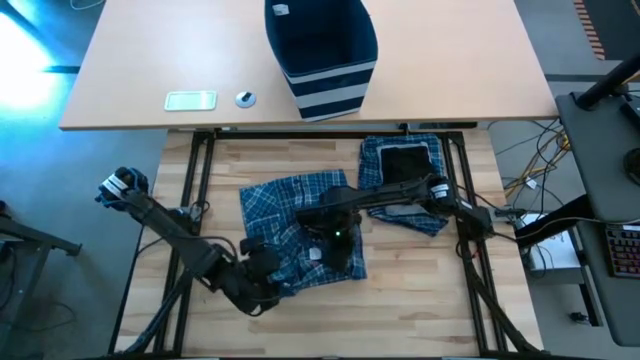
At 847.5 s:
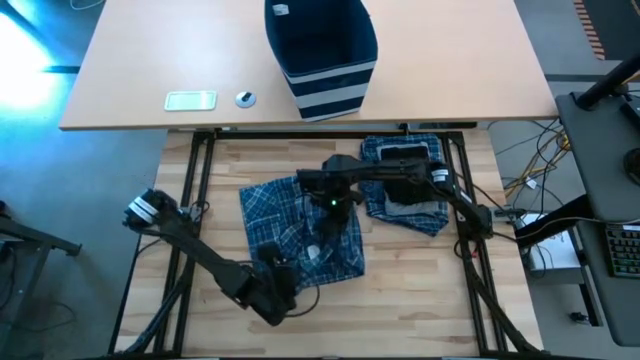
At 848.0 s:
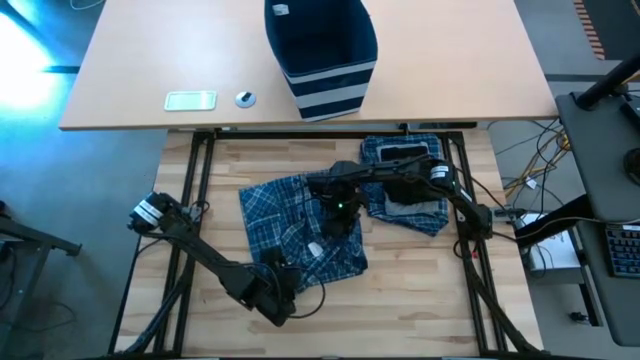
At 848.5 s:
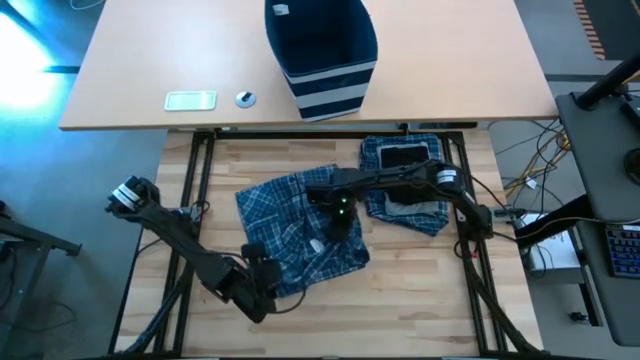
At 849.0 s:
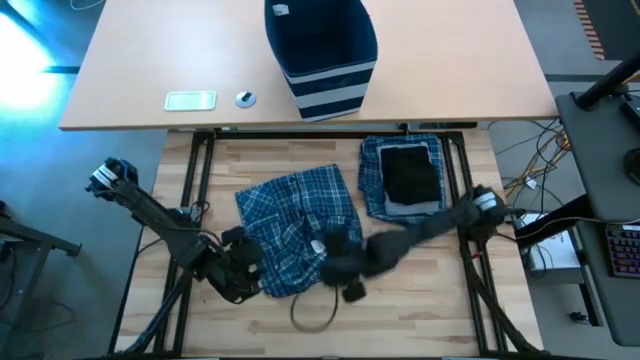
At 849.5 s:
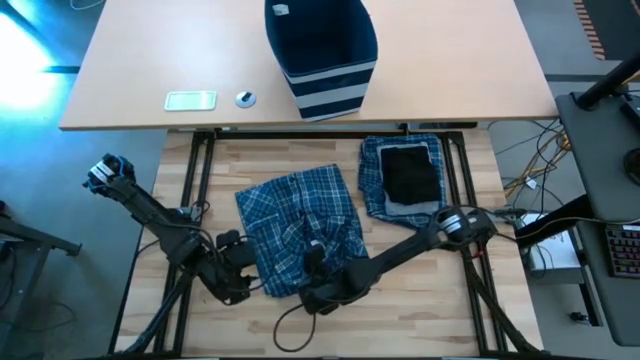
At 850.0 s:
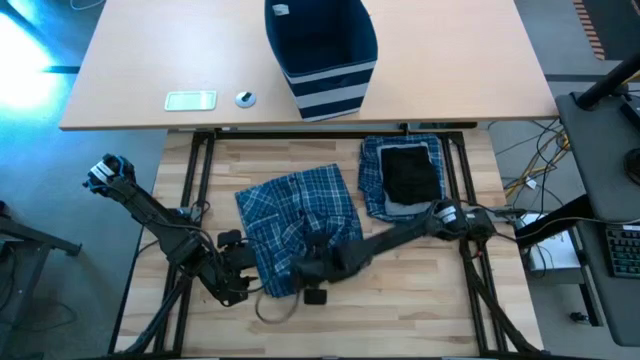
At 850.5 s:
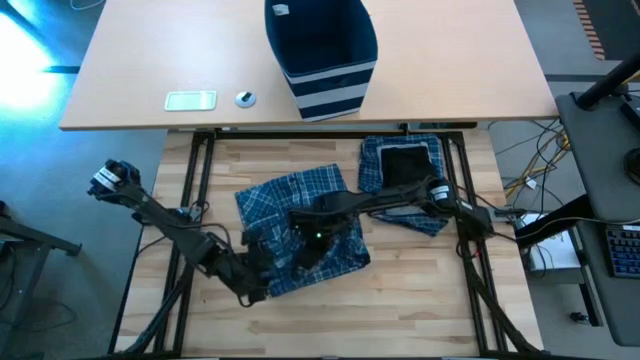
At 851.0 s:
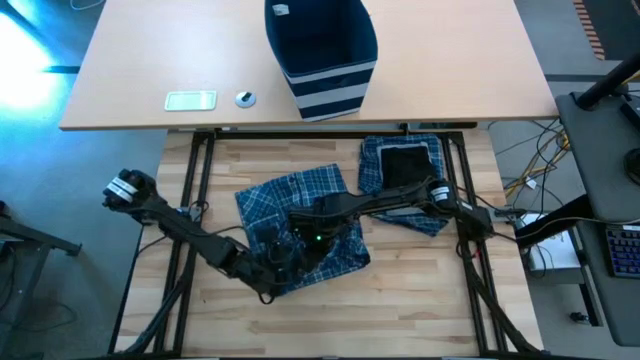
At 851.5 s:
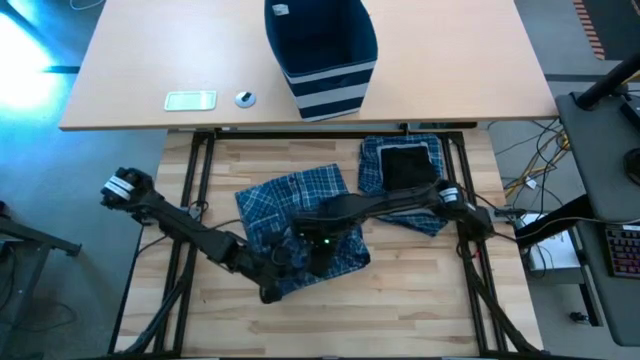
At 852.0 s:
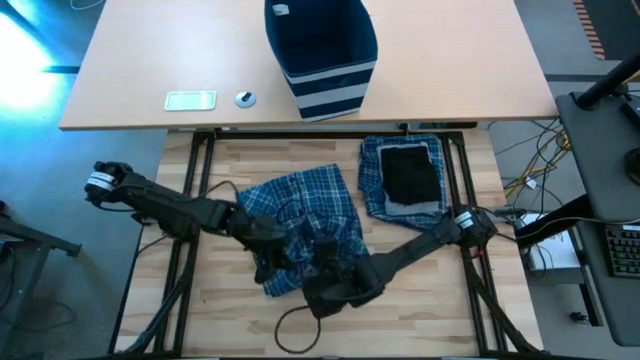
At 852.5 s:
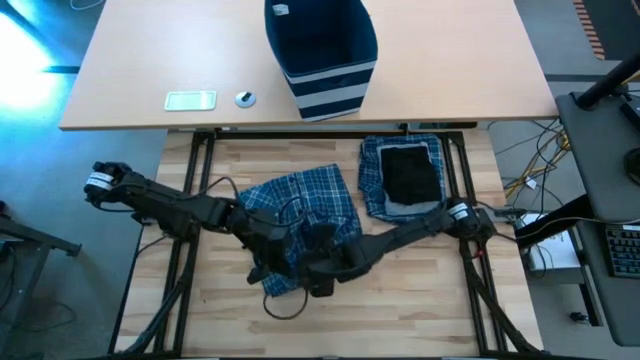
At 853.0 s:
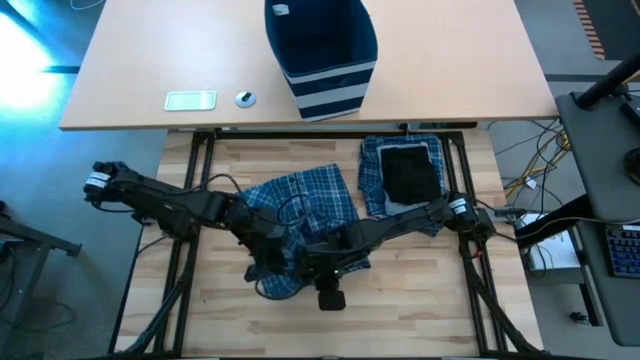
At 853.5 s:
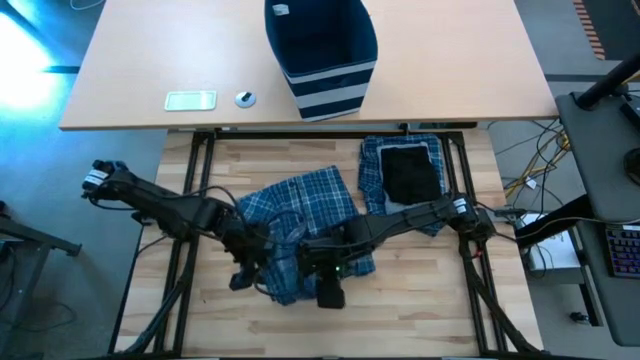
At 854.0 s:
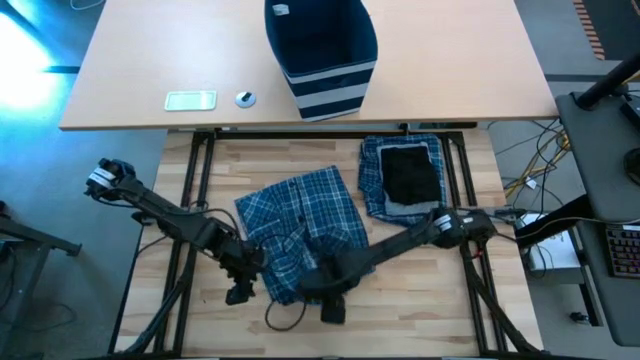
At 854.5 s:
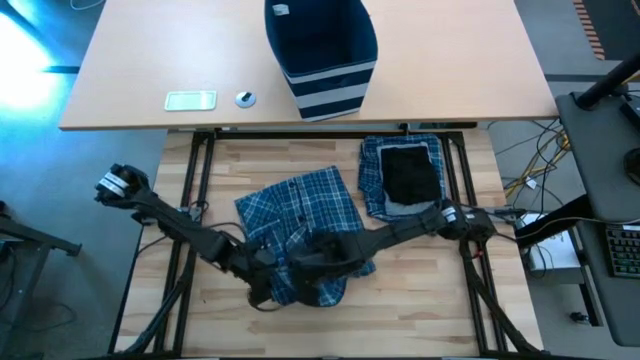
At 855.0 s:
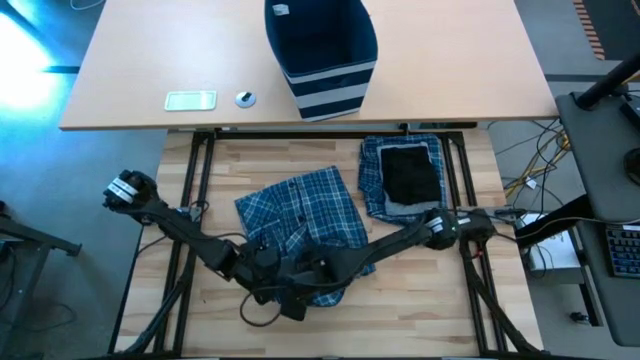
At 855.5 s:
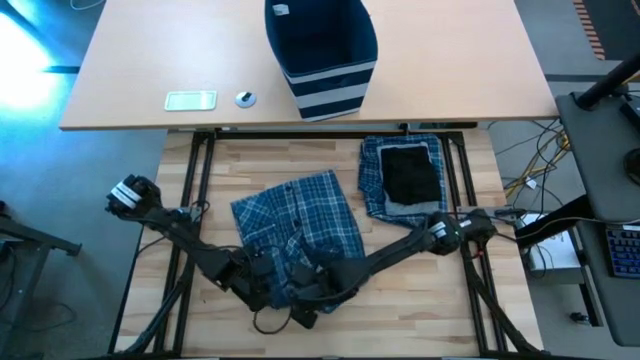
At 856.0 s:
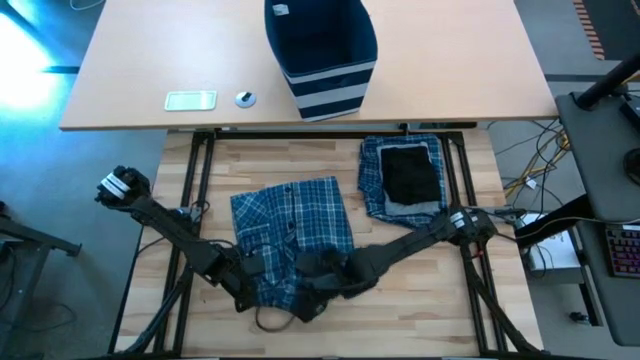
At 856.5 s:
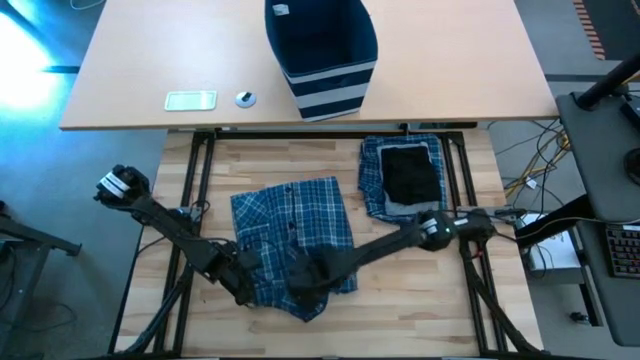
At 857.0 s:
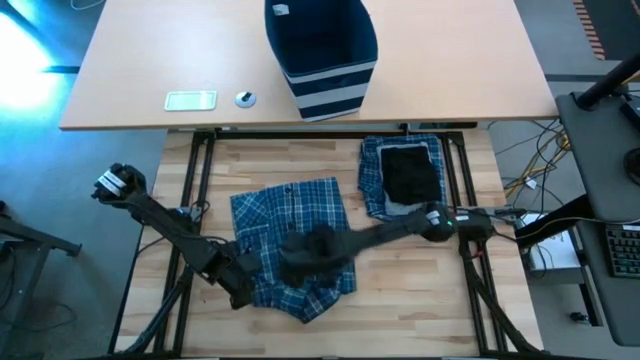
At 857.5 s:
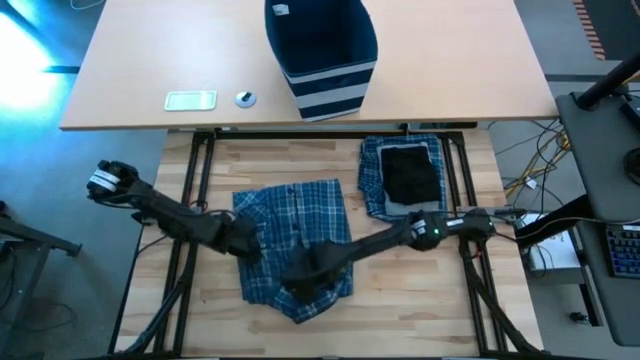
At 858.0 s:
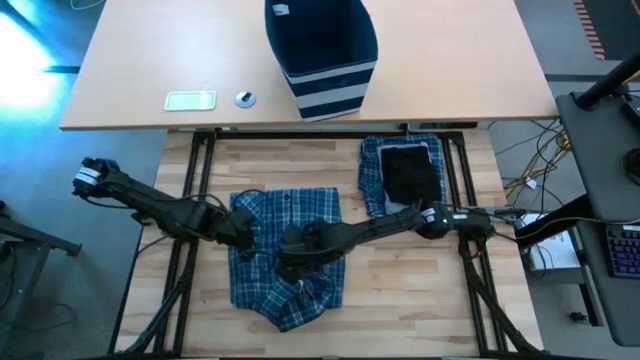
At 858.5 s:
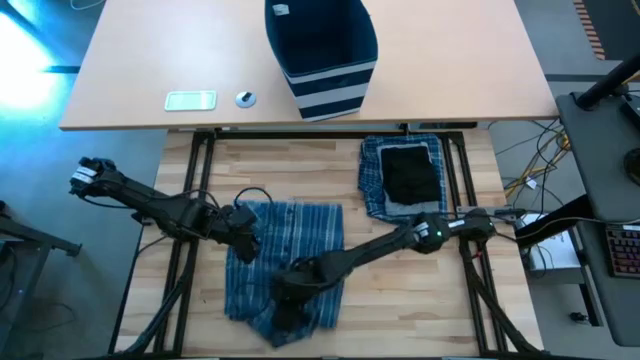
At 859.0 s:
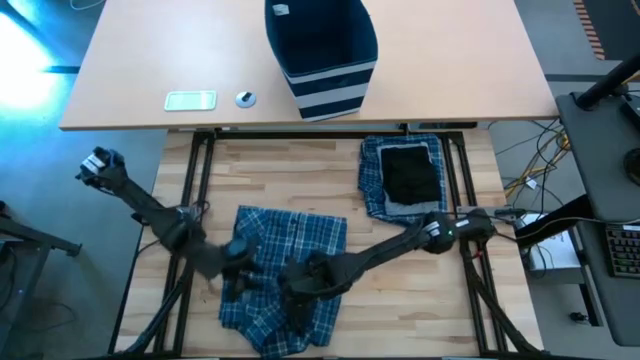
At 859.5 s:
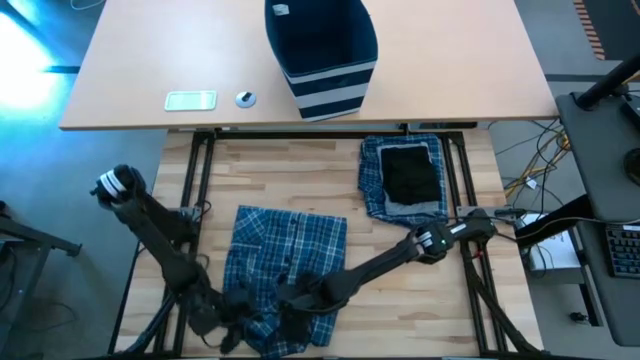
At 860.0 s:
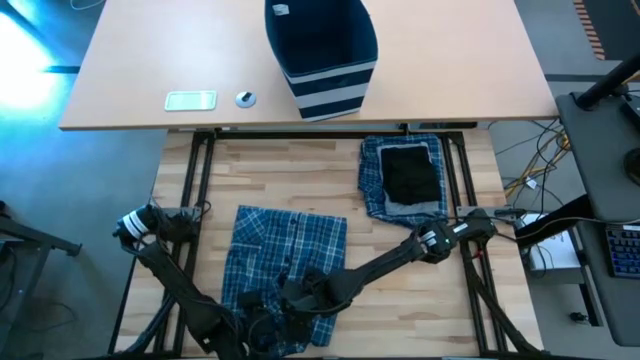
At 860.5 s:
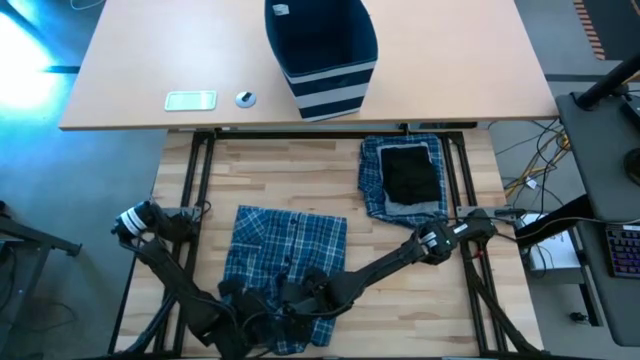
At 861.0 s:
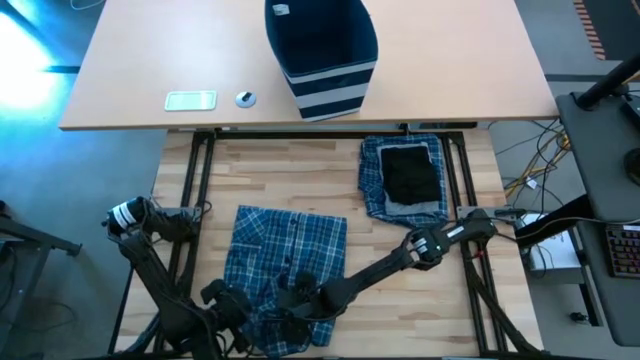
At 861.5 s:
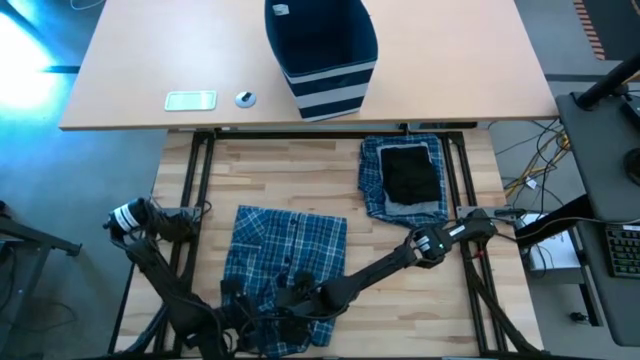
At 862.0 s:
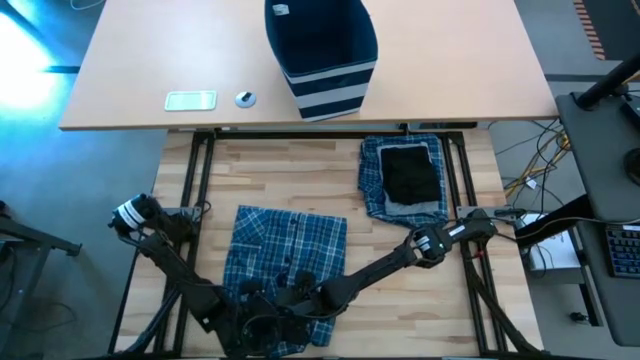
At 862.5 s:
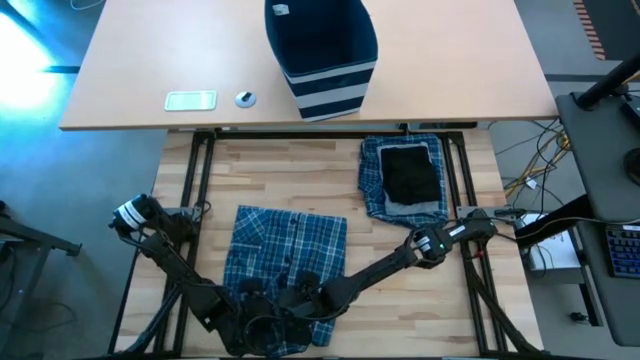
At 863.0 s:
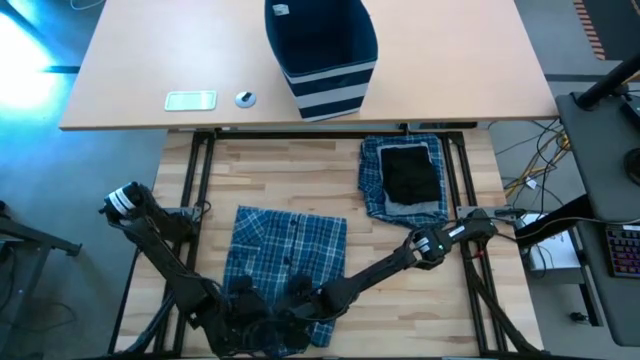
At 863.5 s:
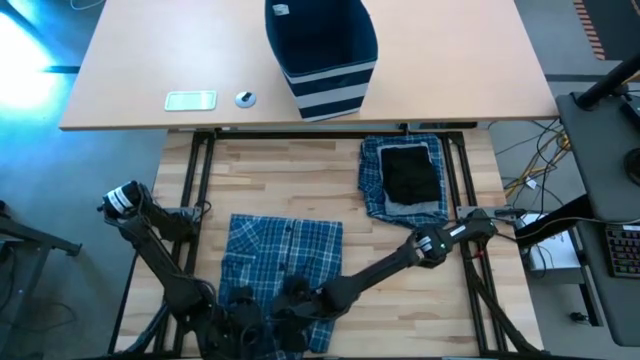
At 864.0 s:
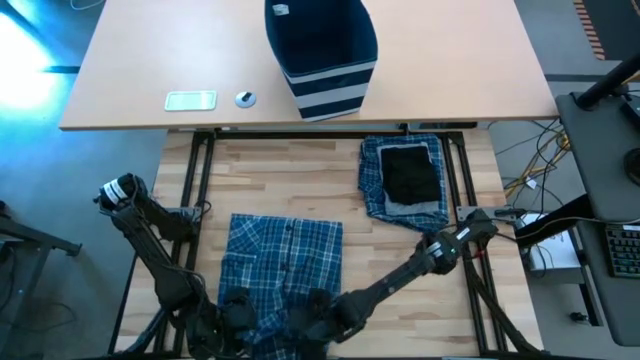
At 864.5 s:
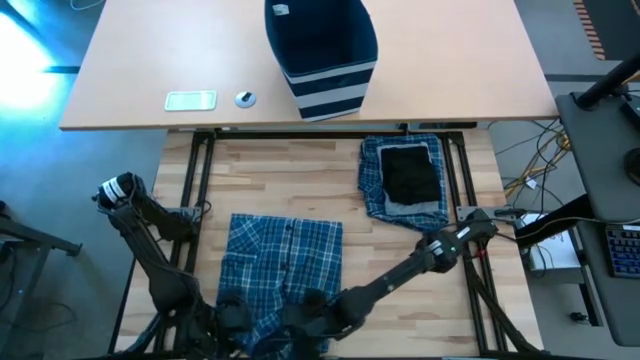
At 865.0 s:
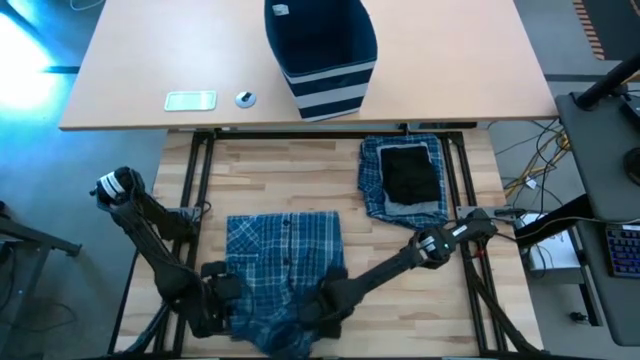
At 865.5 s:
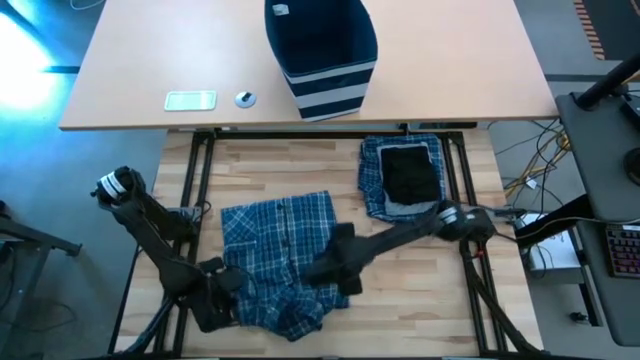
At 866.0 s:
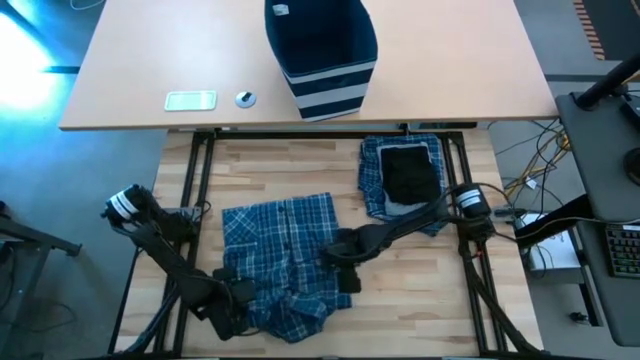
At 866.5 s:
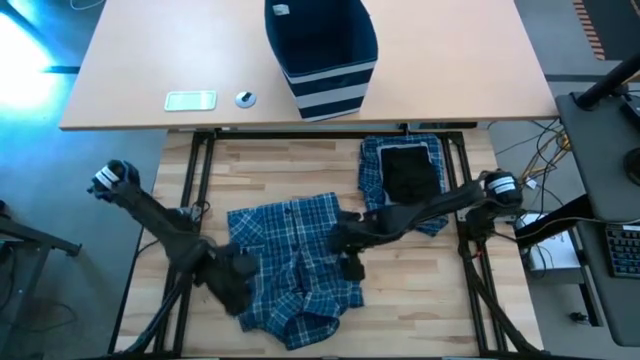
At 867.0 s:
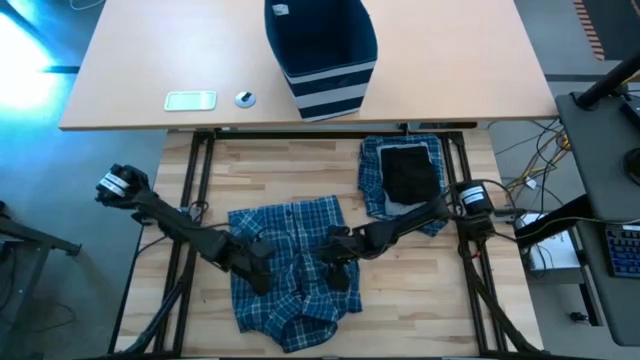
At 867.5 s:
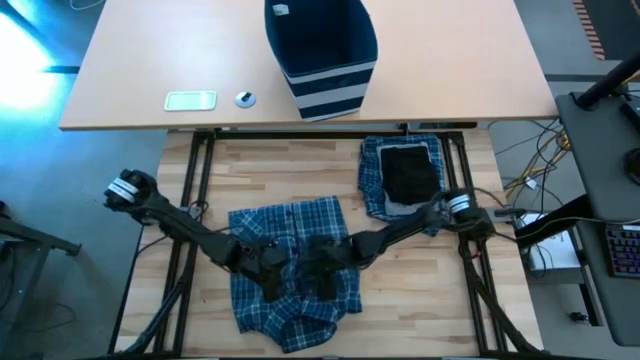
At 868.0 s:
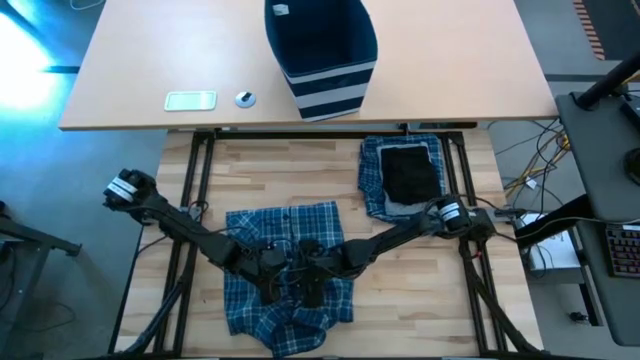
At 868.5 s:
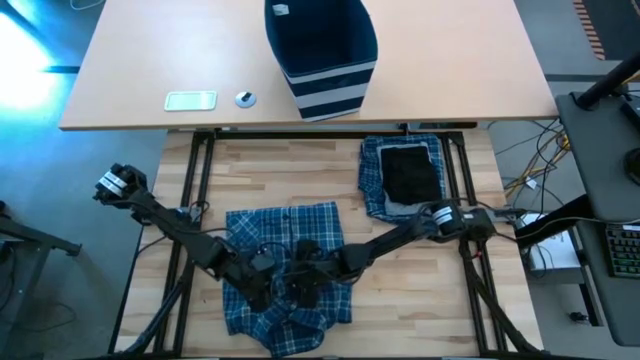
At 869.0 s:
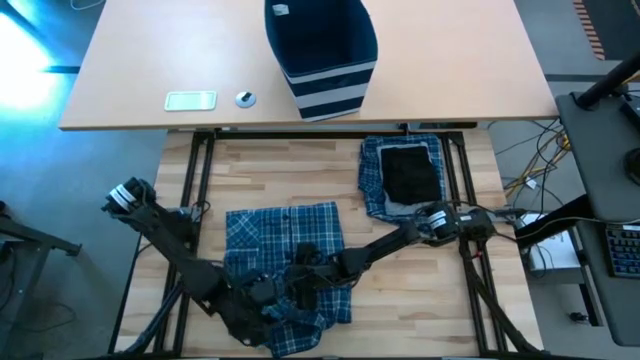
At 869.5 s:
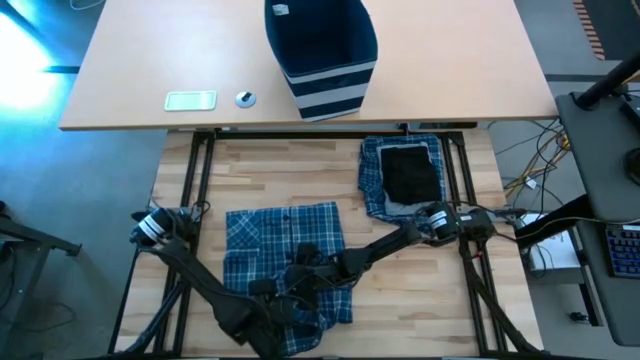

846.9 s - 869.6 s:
Task: Fold Laundry from Bin
Fold the blue patterned long sleeve
